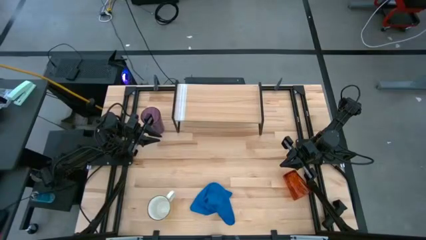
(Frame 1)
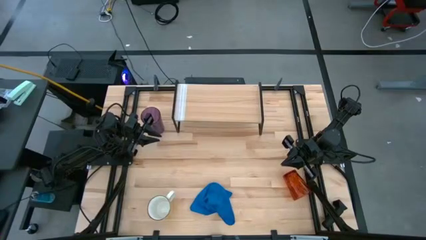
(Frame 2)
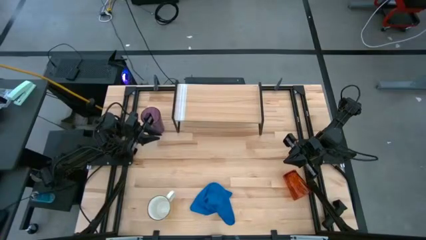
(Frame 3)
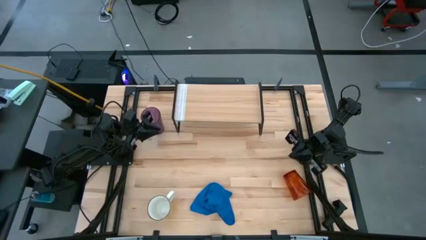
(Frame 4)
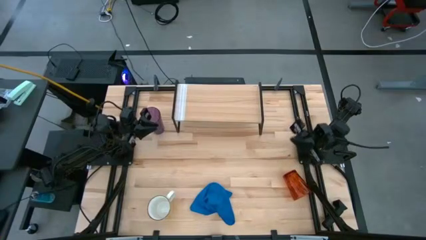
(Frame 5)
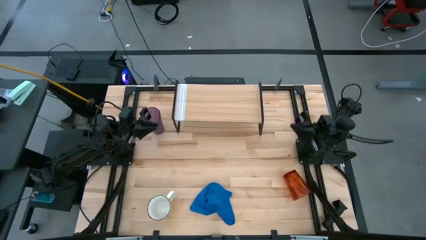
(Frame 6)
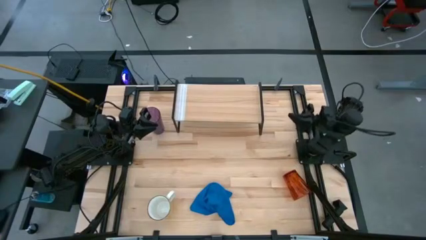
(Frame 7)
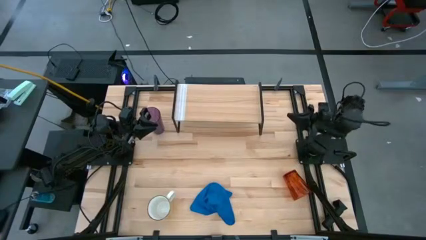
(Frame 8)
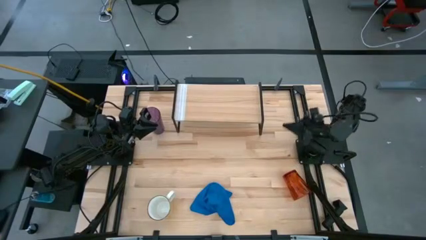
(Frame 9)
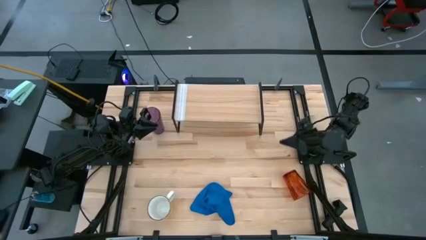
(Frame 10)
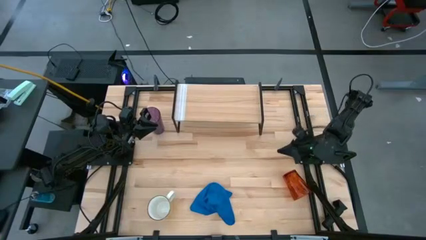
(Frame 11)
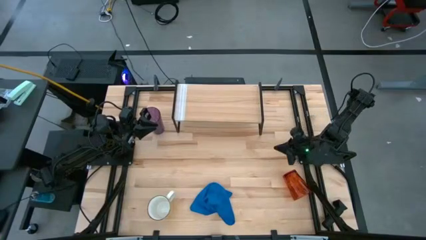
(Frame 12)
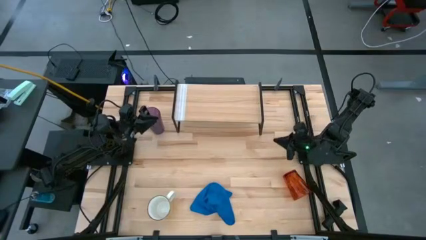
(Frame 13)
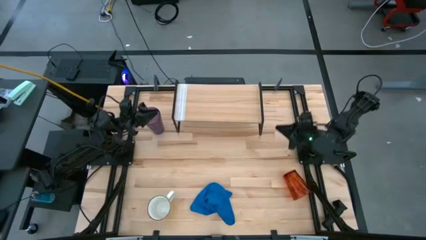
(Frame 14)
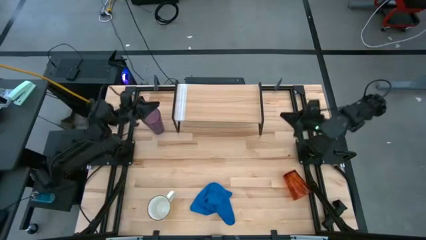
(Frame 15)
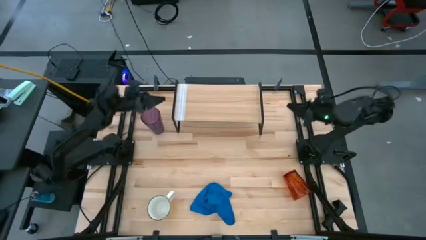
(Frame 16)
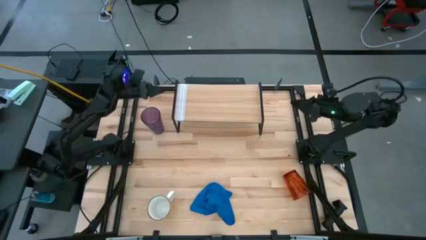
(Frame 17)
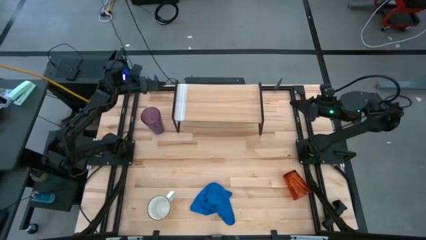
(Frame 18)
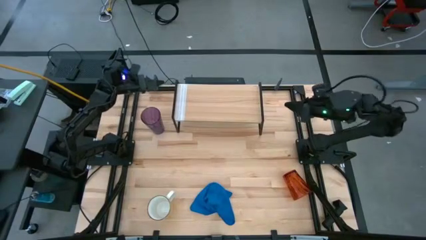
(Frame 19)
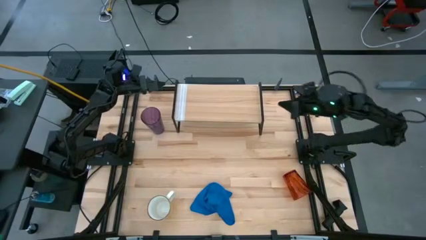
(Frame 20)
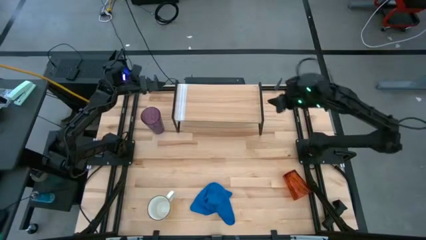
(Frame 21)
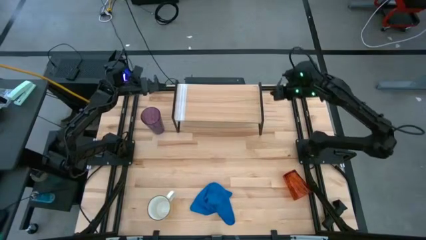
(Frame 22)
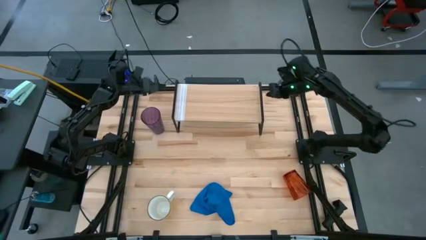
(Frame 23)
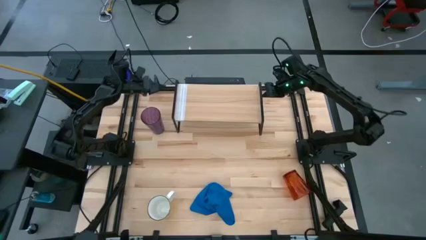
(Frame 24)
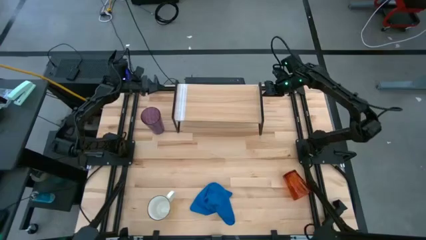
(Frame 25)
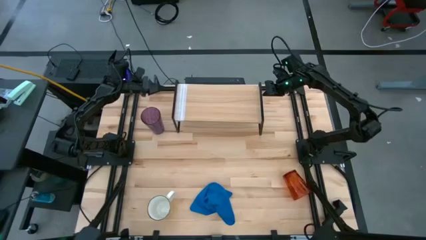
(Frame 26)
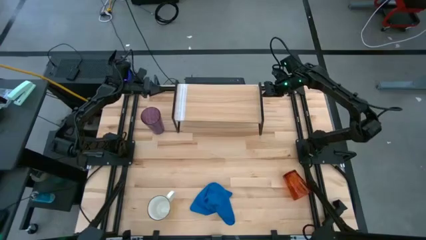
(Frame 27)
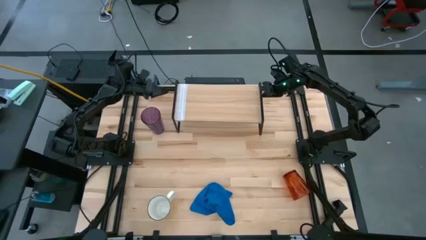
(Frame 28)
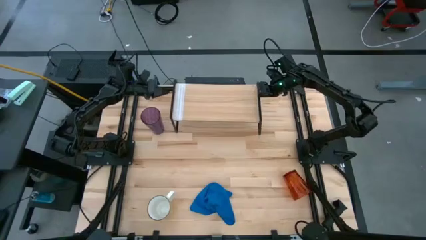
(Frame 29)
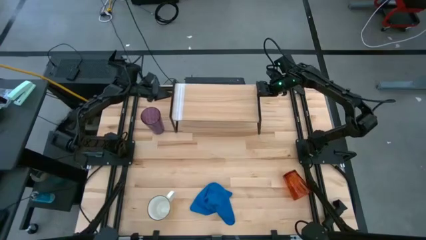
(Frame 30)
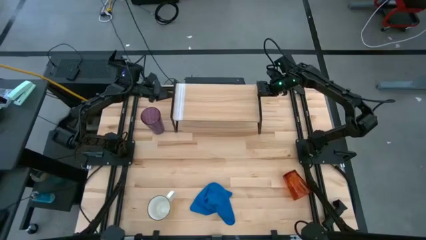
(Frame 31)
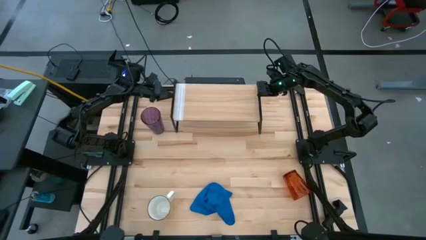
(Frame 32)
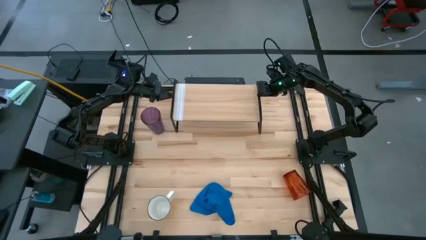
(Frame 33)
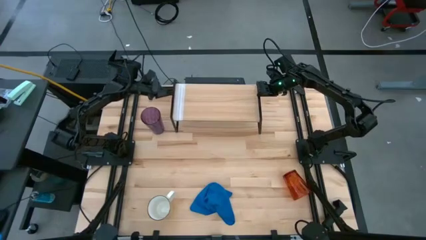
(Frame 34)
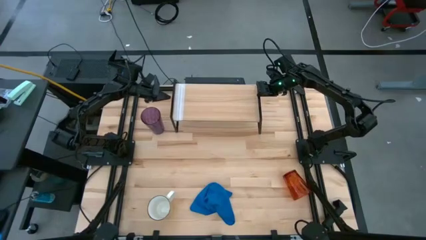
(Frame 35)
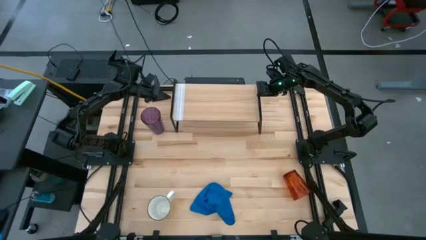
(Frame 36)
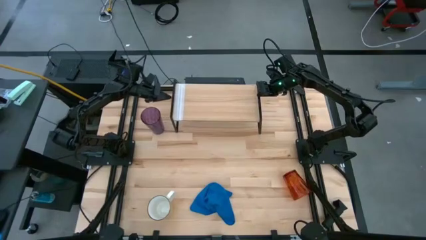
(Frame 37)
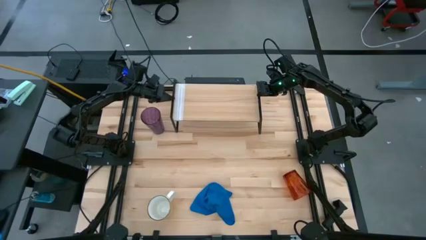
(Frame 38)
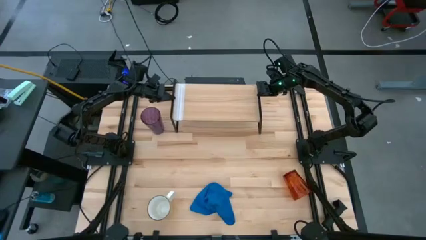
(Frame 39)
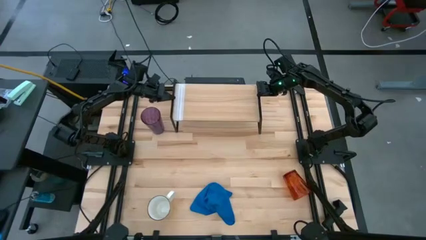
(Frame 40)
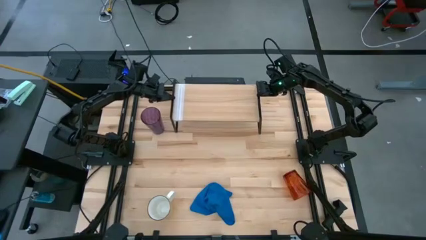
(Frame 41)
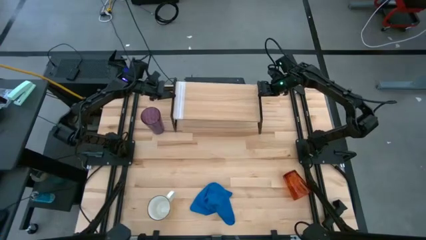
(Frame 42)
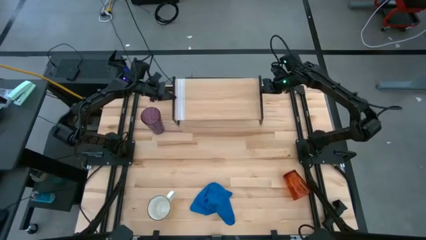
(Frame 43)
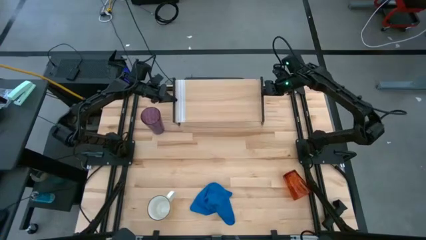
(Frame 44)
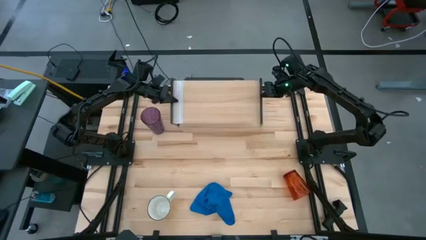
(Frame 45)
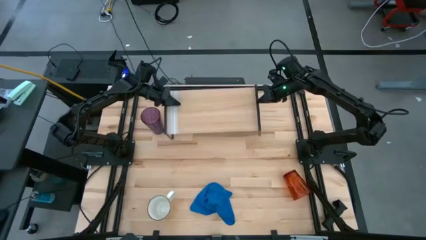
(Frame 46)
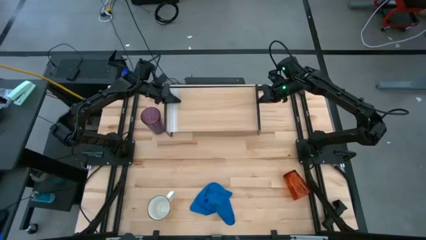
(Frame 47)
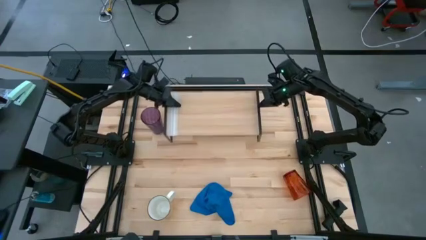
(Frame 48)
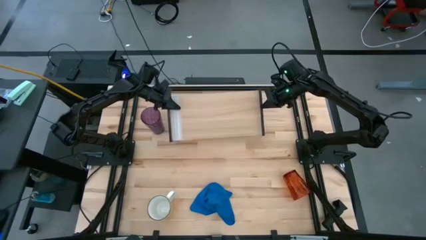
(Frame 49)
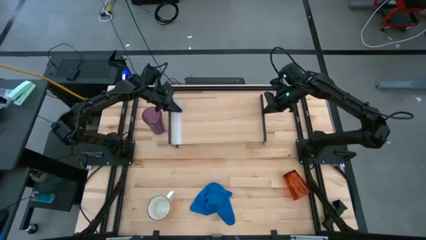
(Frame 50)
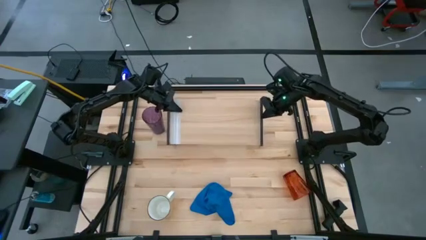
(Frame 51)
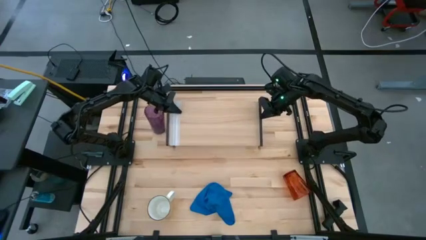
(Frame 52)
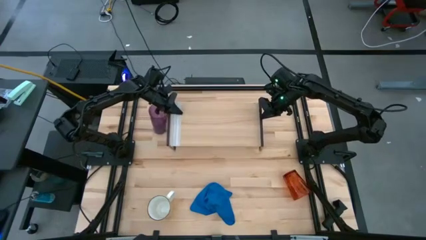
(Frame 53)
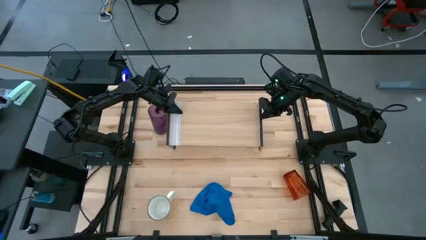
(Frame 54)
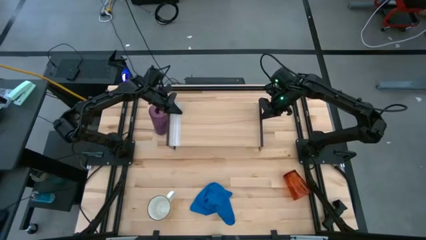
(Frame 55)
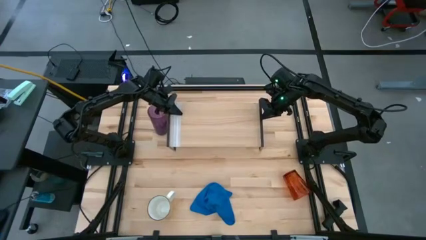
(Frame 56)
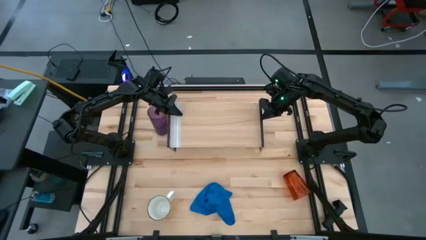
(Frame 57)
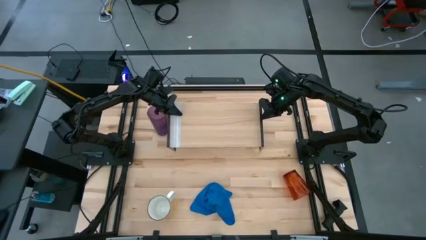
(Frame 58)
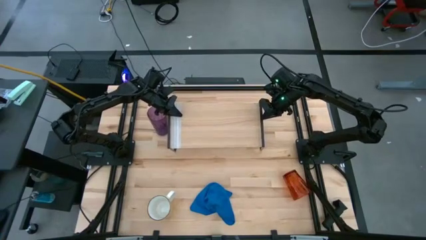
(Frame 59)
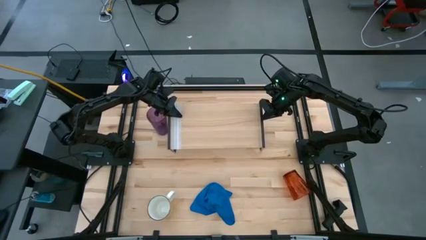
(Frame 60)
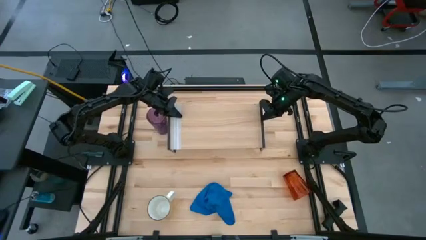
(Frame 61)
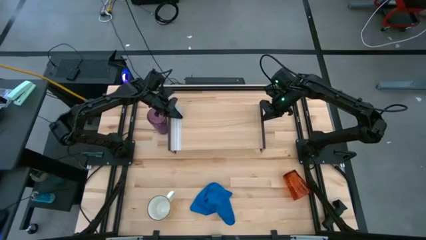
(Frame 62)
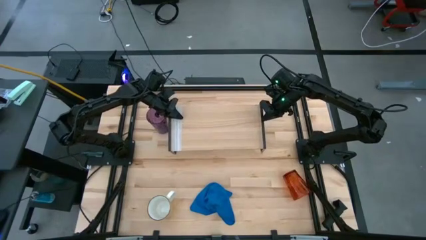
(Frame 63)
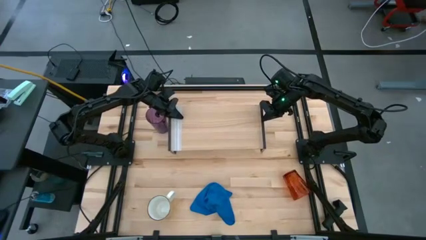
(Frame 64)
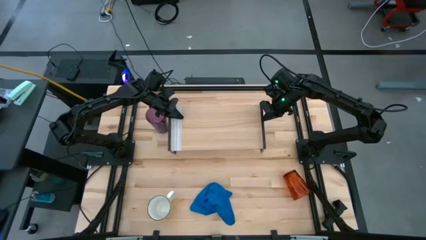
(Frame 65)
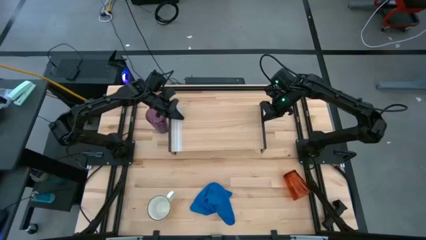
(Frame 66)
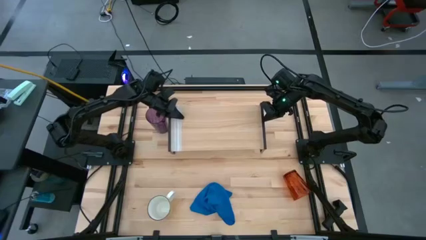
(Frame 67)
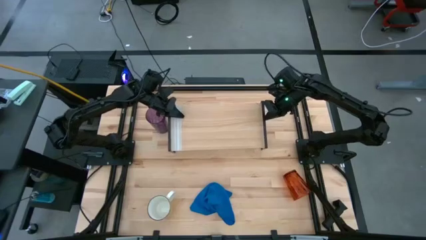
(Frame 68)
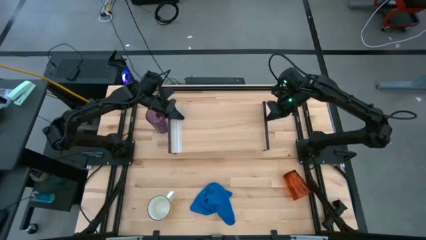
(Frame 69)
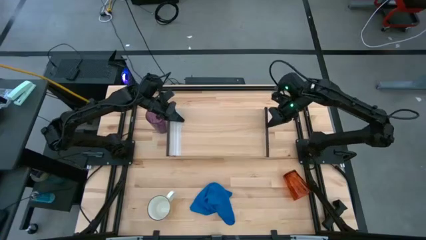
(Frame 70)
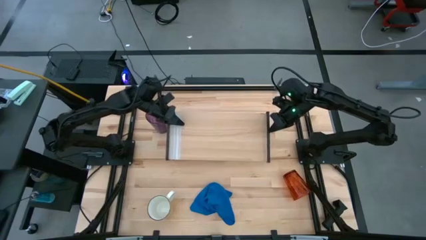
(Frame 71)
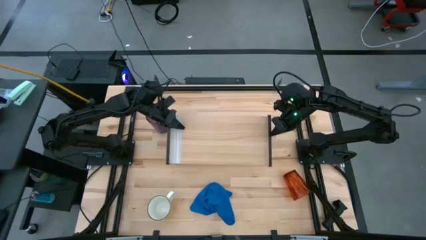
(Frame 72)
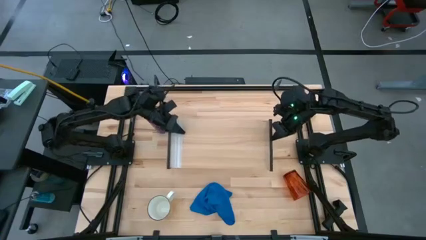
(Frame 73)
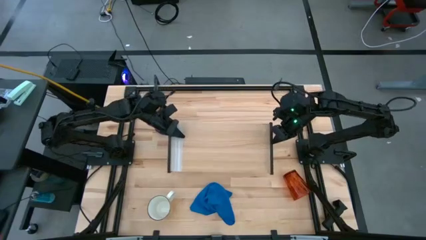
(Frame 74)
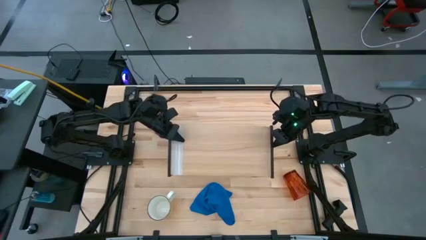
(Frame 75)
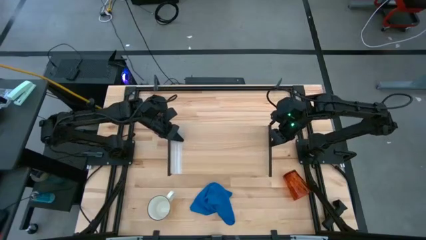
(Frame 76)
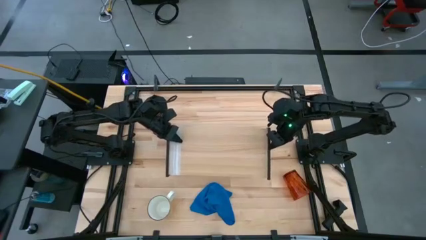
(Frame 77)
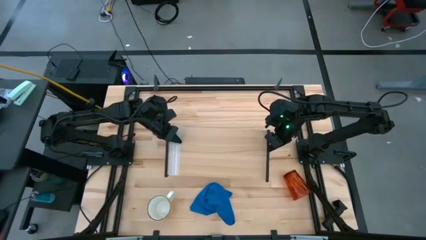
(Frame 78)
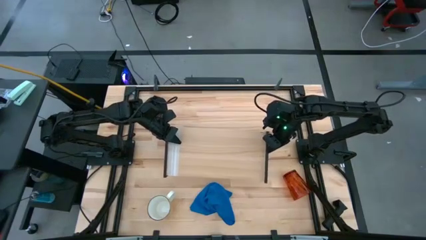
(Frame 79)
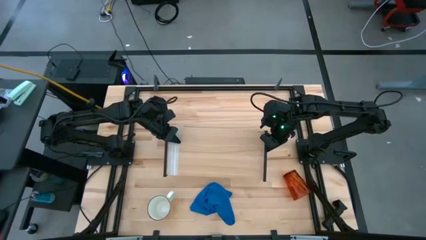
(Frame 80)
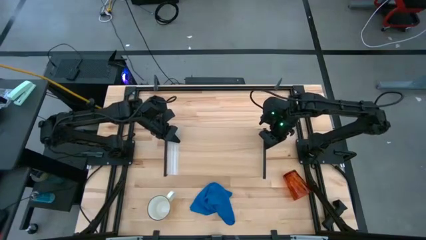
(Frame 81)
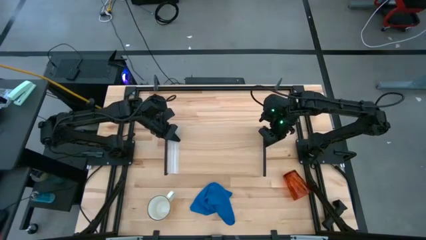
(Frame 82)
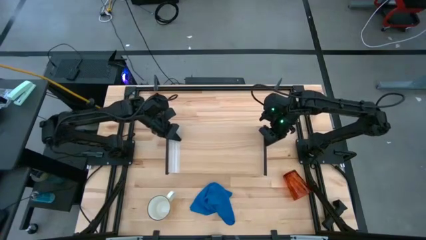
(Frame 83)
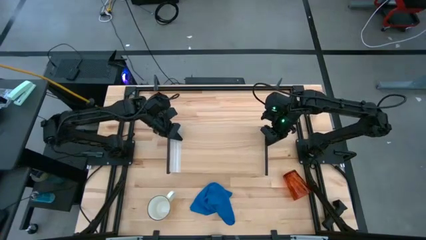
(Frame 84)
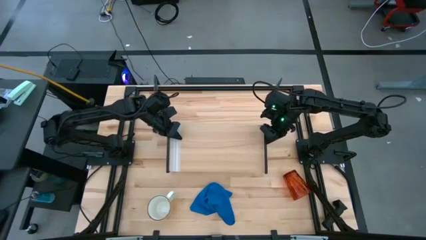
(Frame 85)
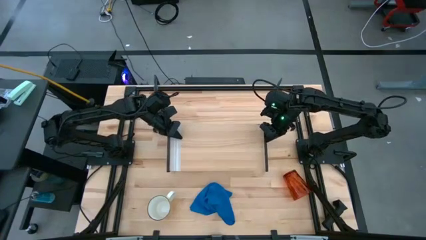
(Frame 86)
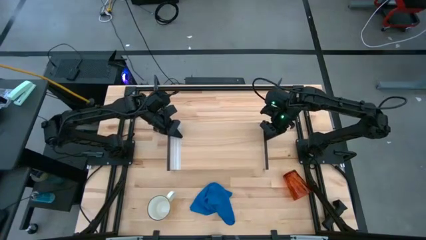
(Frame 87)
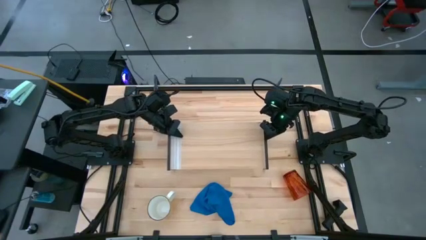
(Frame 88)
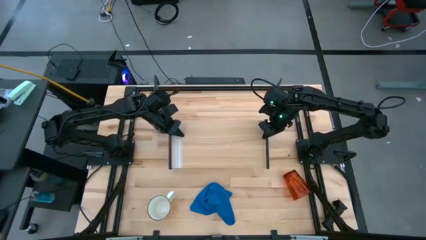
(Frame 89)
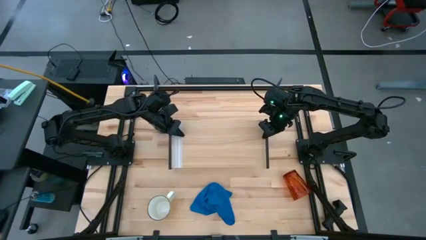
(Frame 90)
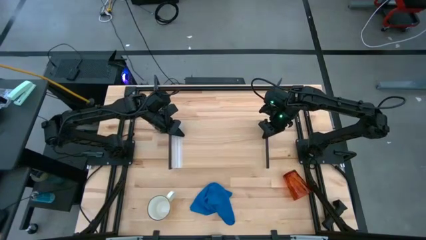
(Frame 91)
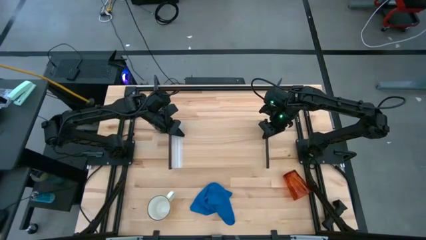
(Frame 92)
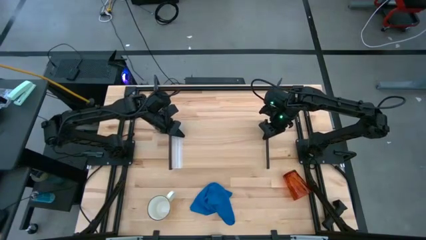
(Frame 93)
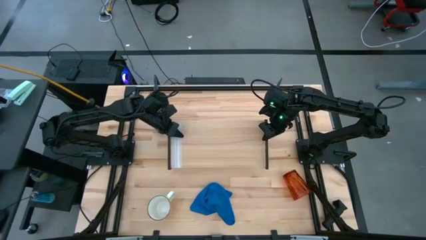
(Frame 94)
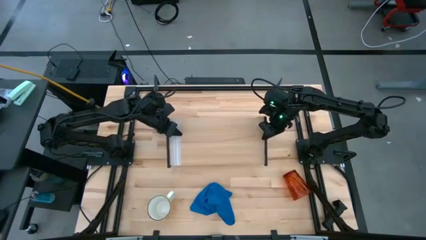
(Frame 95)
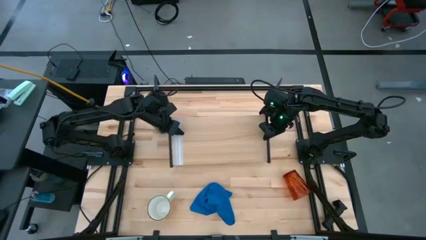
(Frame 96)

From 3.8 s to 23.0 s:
Task: Stack small to large cups/mugs on shelf
Move the shelf to the center of the table
